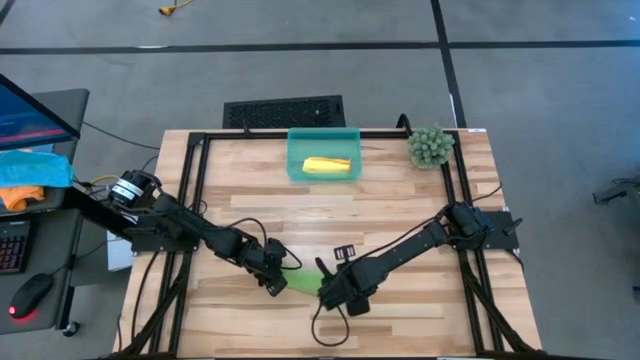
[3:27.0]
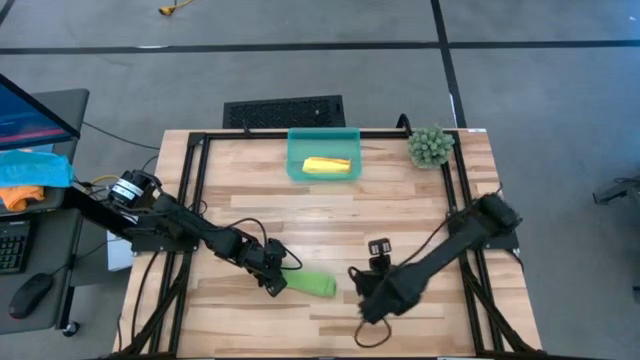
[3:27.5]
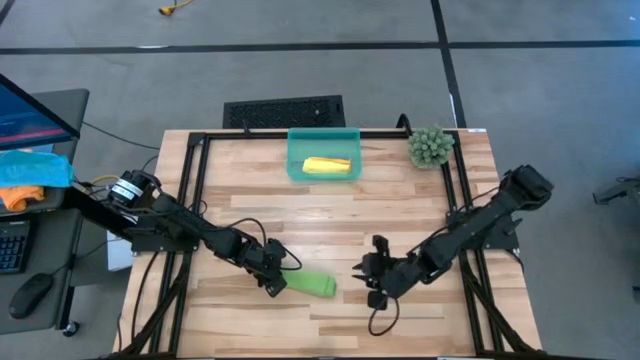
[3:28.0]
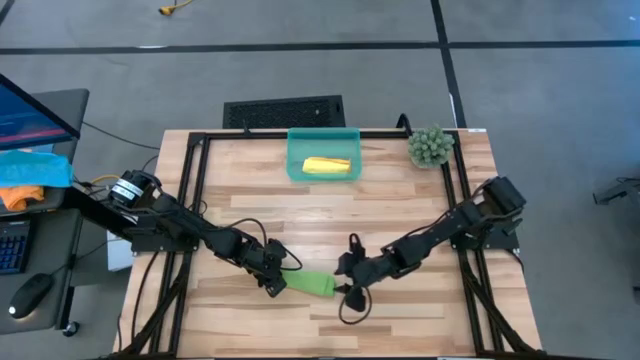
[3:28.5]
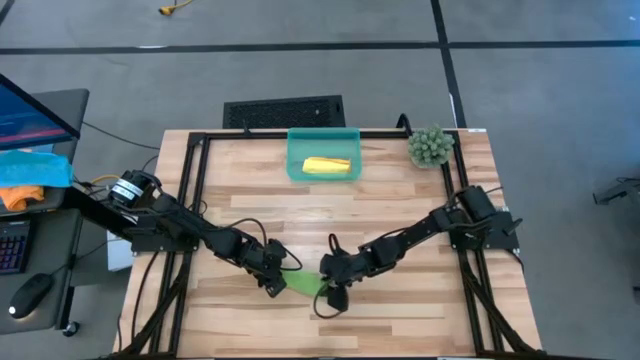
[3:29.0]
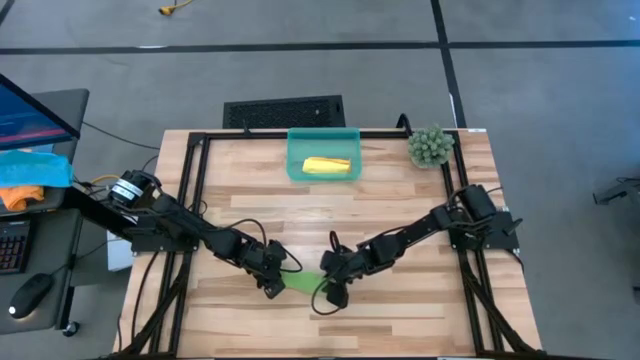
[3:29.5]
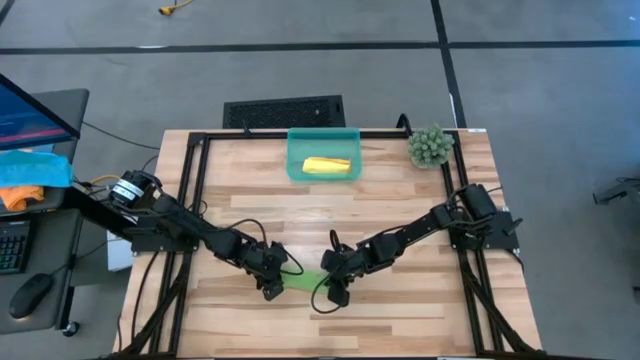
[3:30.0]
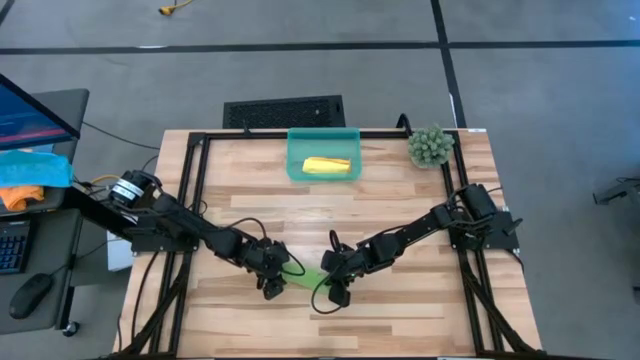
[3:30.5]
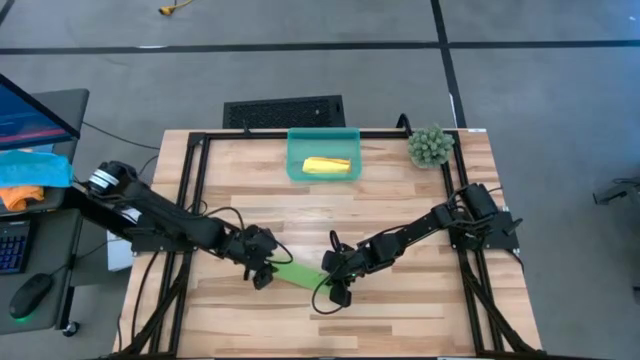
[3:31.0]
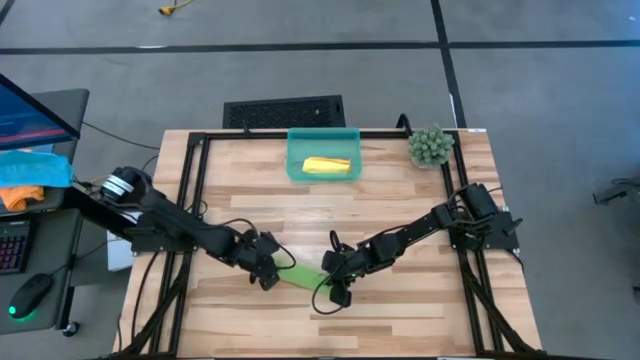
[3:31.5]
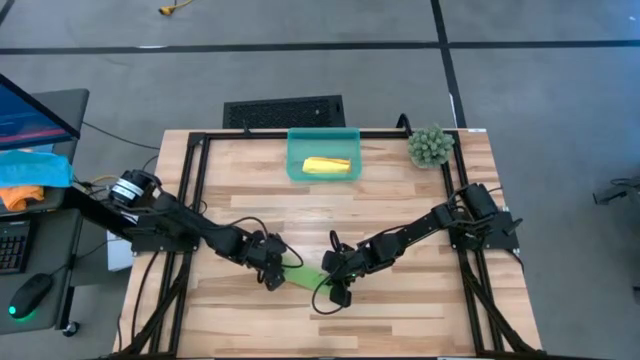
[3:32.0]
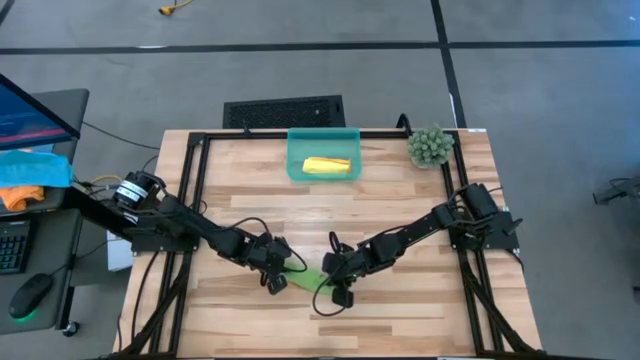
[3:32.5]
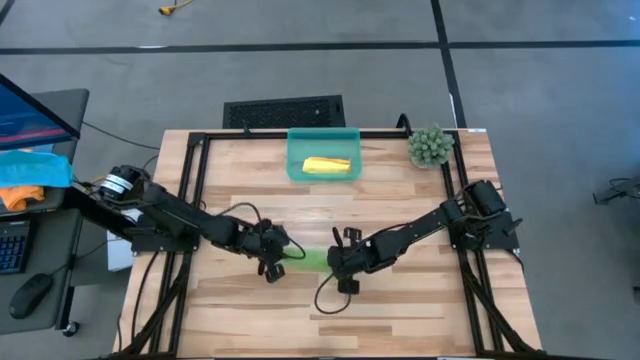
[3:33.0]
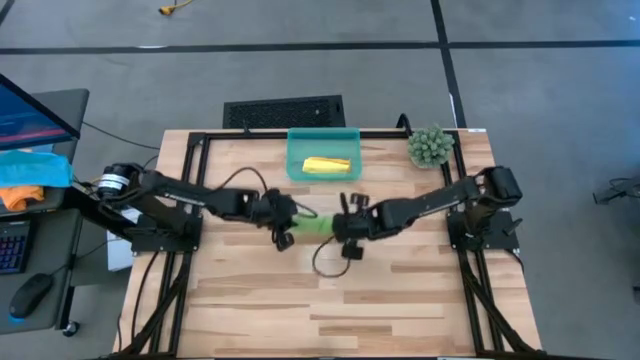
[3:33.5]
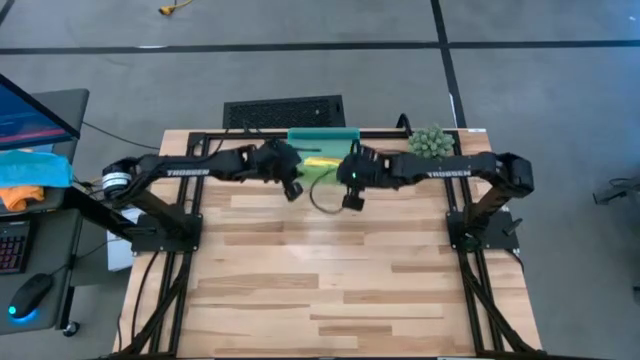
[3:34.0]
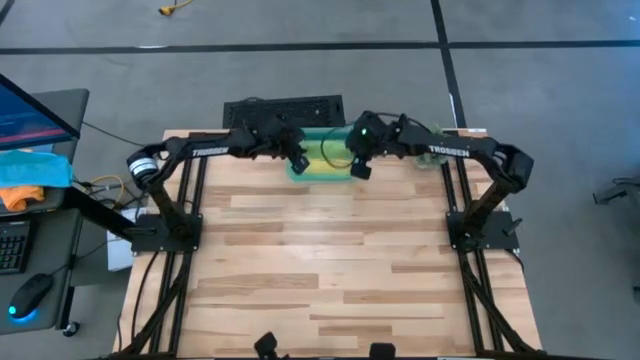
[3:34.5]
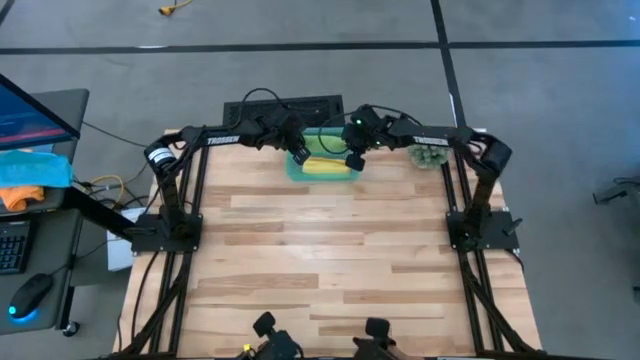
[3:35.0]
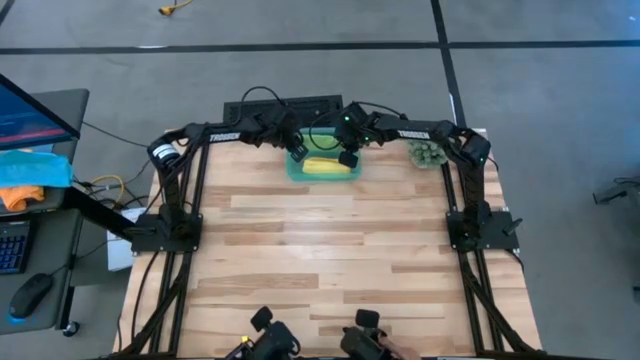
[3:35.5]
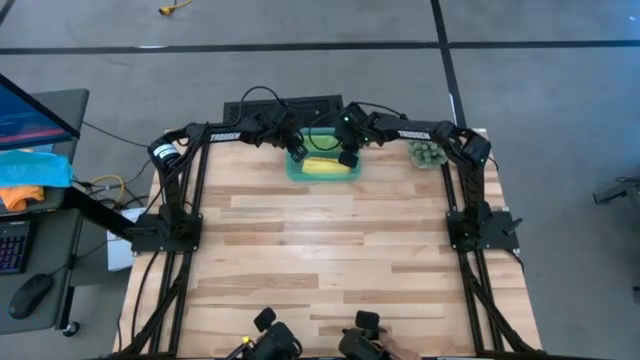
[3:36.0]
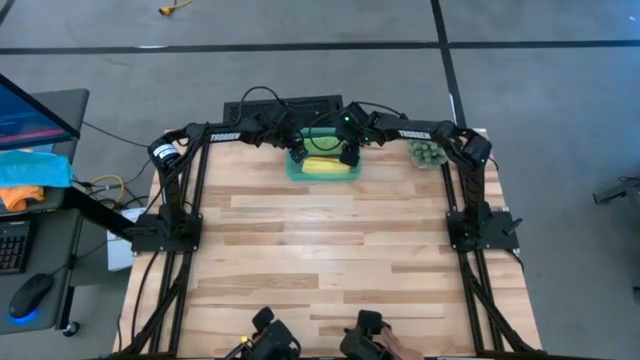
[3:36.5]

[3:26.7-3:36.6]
Task: Roll microfiber towels into tight, uniform cylinder then place into a basket
Put the green microfiber towel into the blue bin

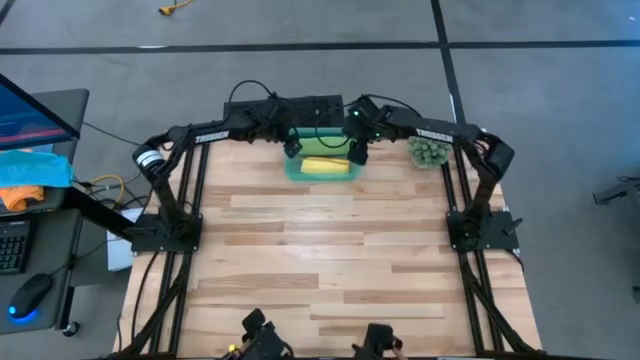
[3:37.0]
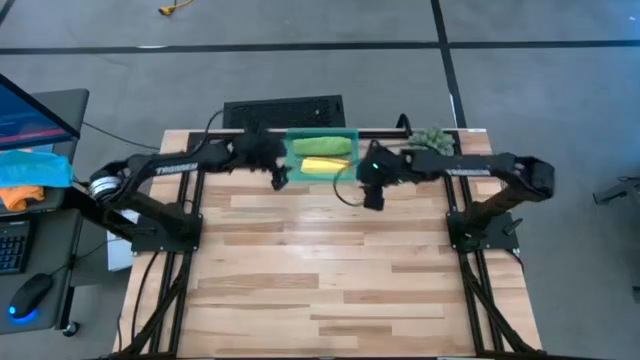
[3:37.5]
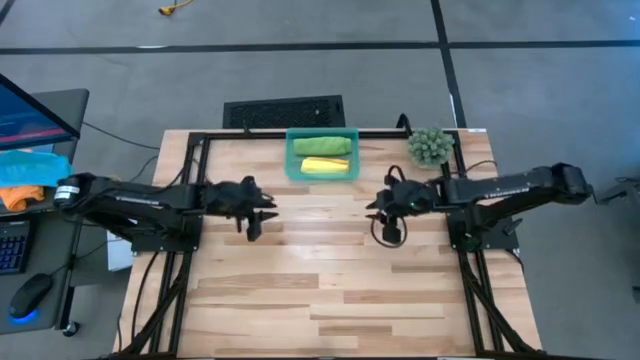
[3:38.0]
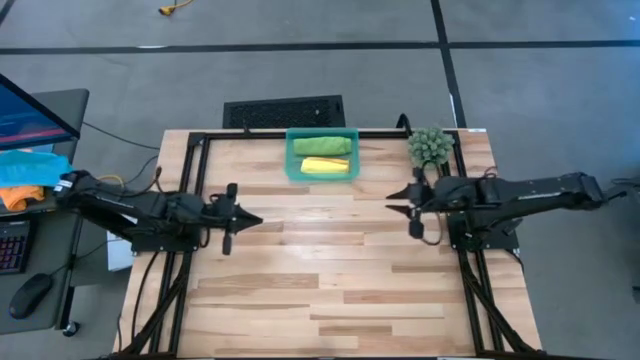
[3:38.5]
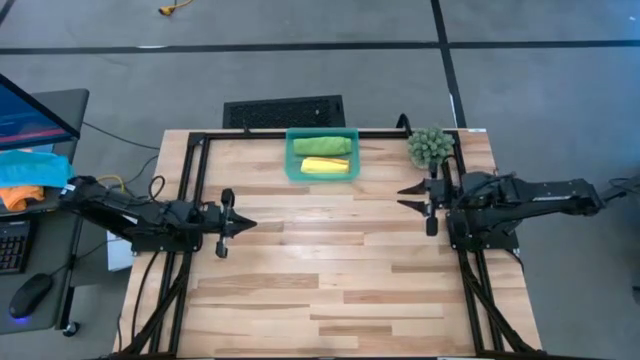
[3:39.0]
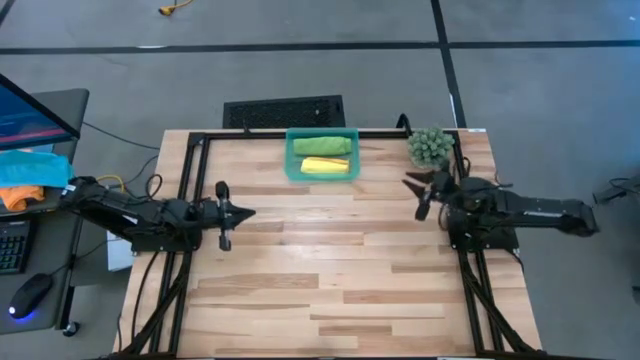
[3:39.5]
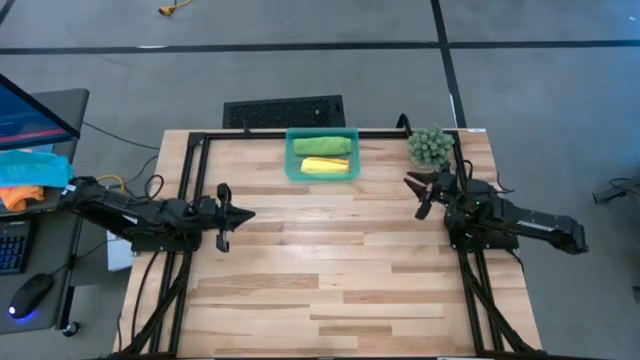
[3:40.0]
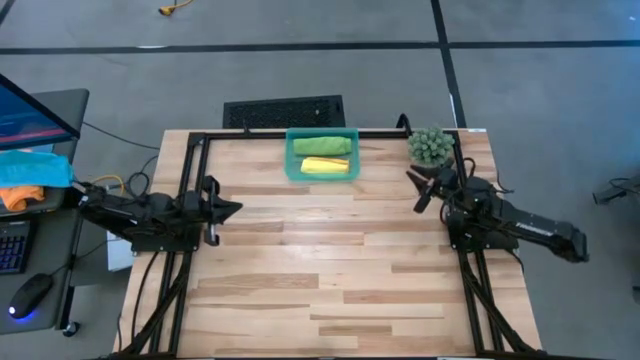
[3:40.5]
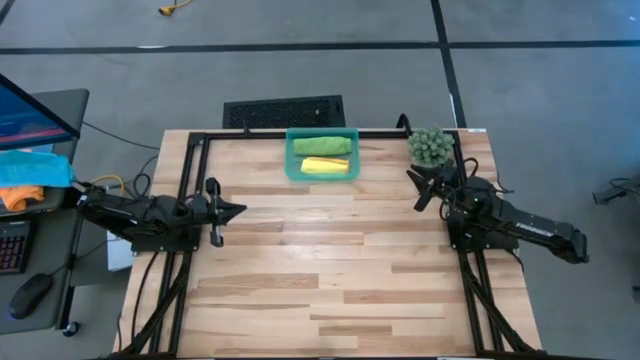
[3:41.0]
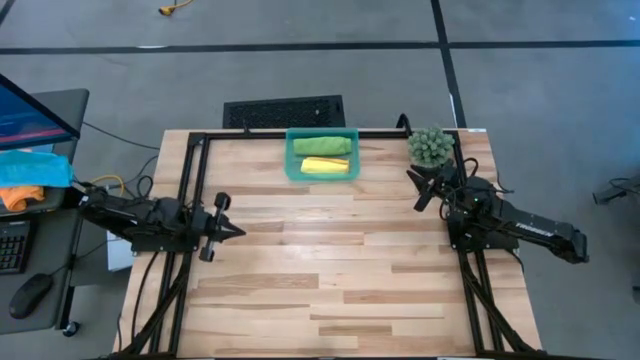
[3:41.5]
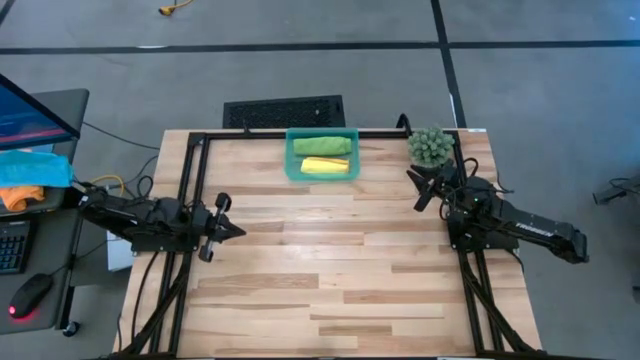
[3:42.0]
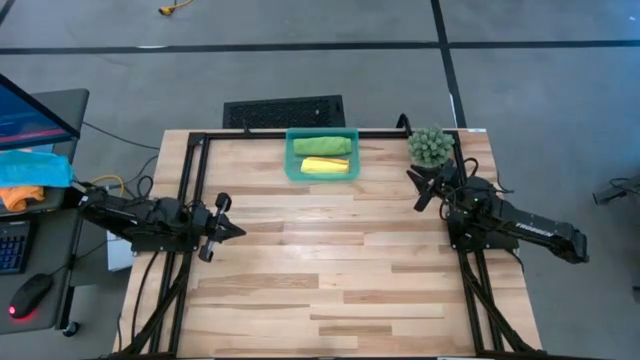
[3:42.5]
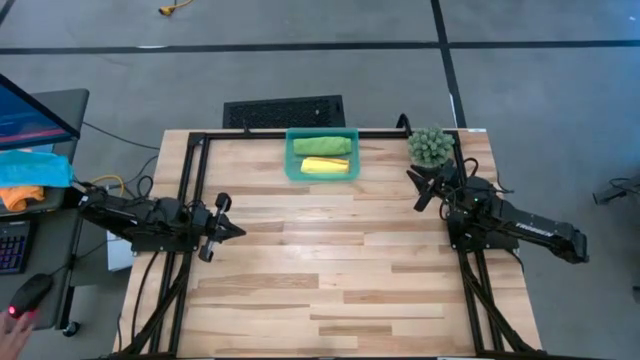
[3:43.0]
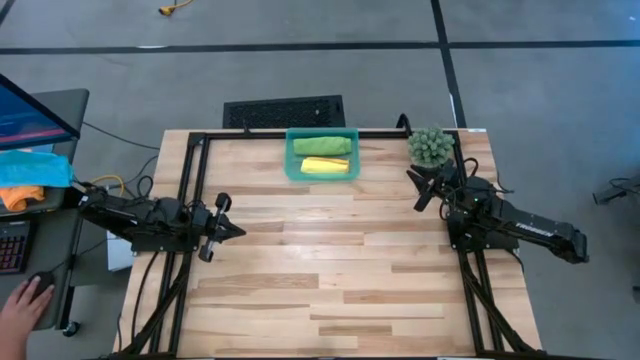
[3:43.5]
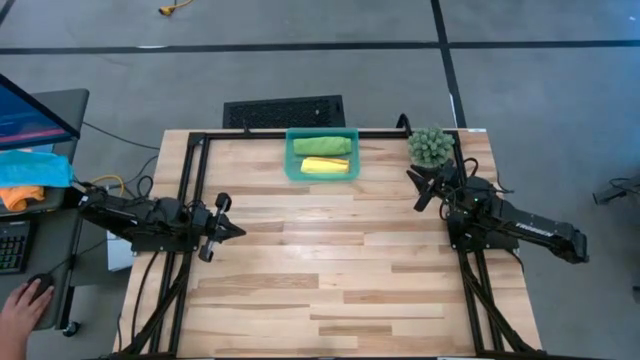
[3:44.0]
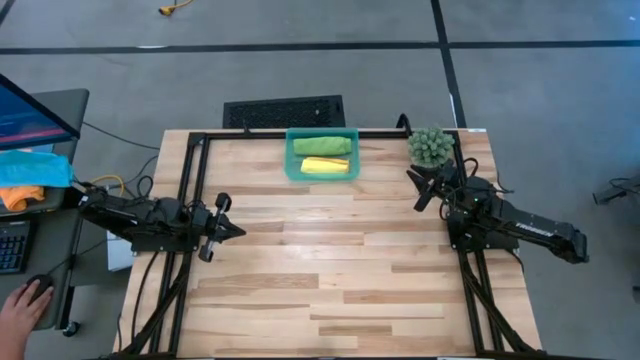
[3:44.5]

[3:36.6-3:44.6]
Return to Home Position

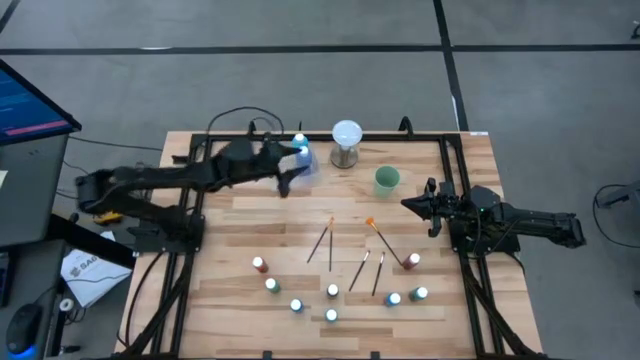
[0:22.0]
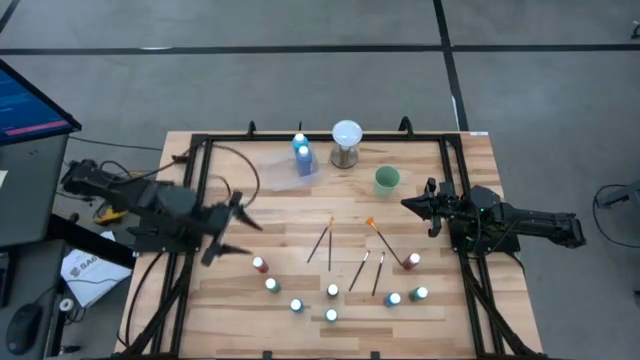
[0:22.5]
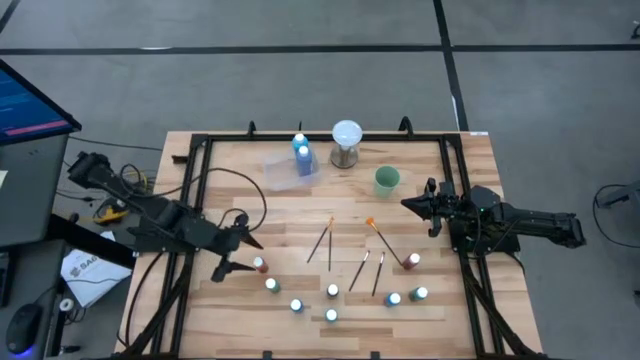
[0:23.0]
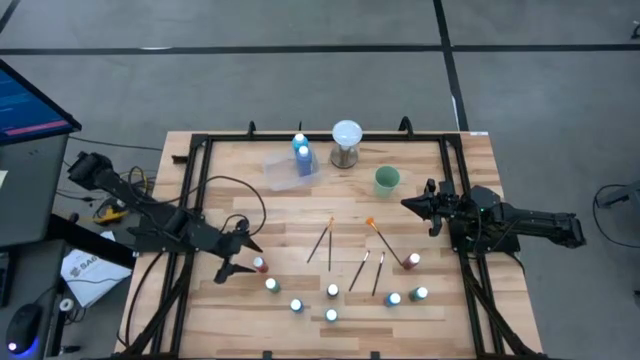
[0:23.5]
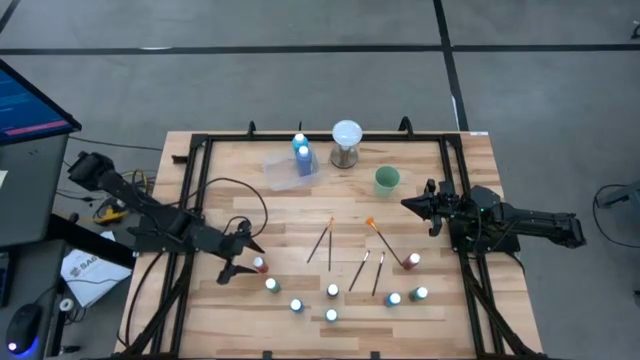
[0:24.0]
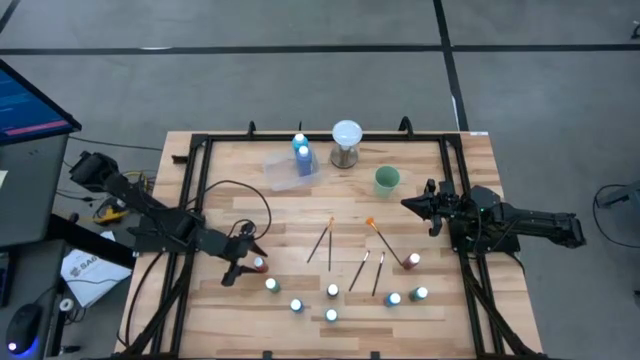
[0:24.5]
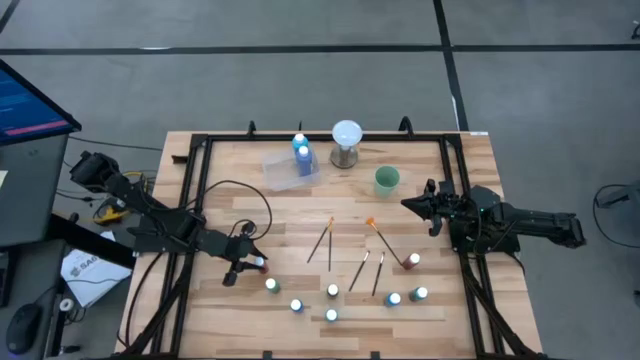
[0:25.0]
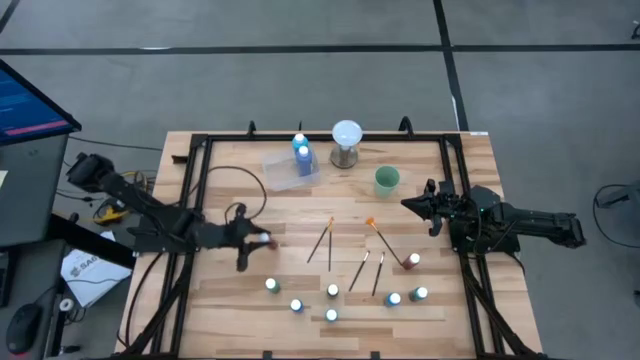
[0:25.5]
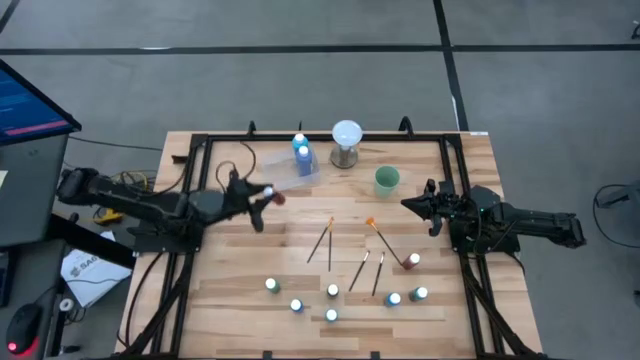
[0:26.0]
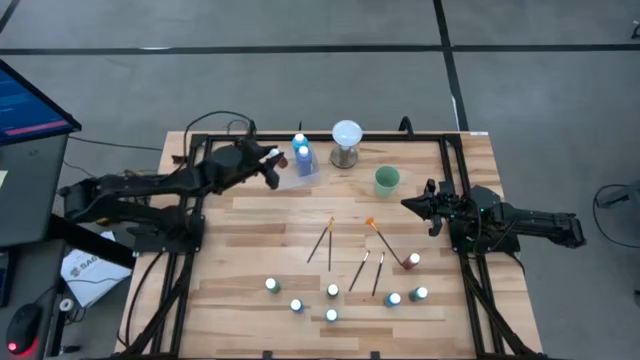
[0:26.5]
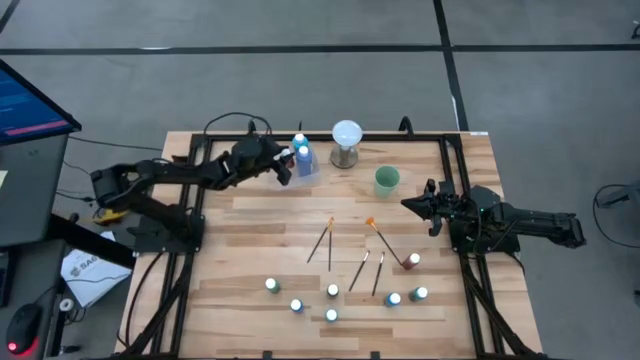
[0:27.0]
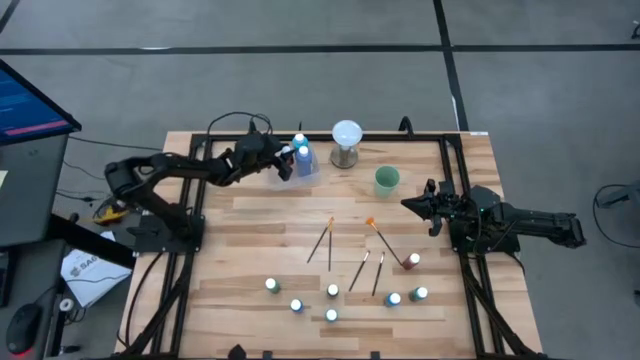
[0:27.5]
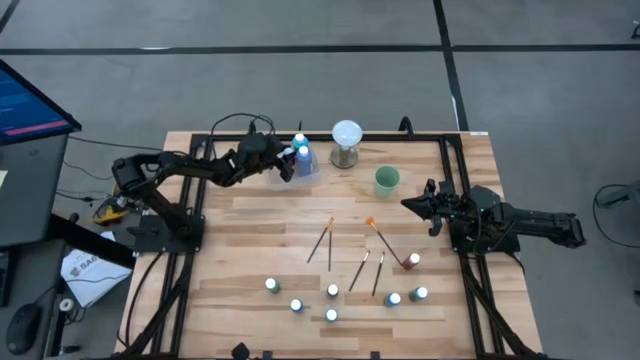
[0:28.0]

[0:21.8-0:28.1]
Task: Pick & Place Paint Supplies
Put the left small red paint bottle into the transparent bin
